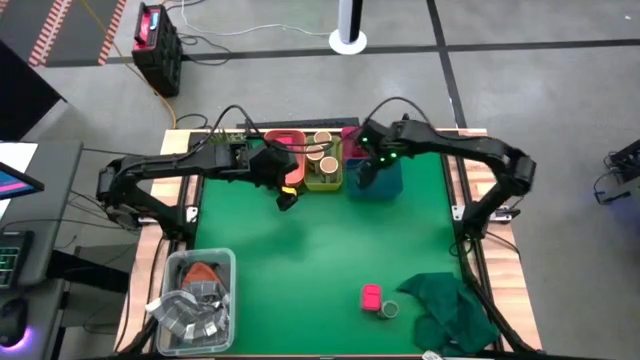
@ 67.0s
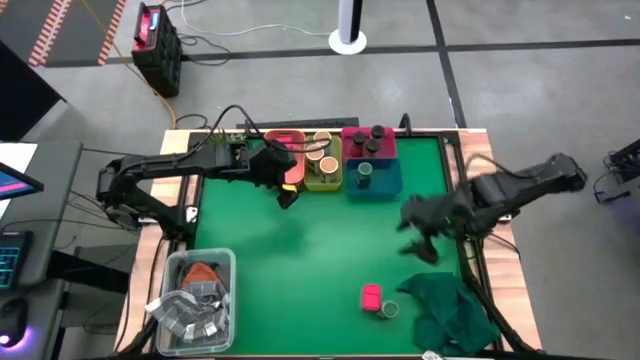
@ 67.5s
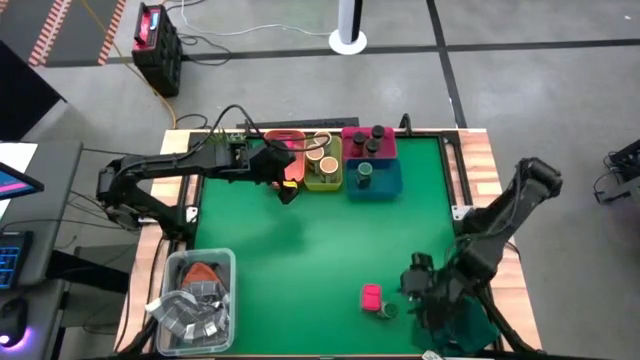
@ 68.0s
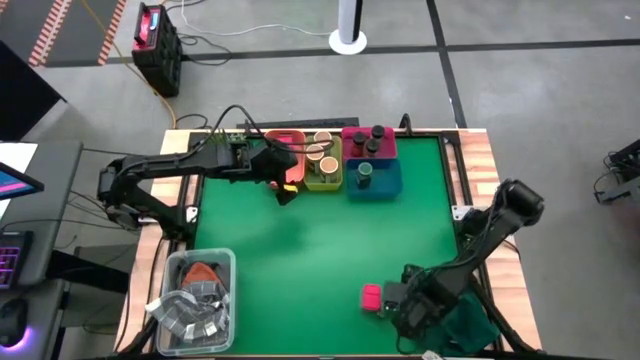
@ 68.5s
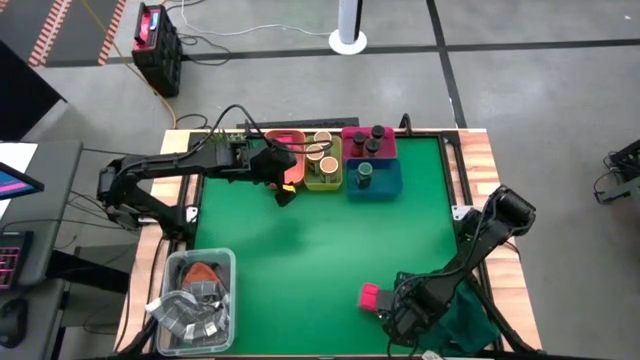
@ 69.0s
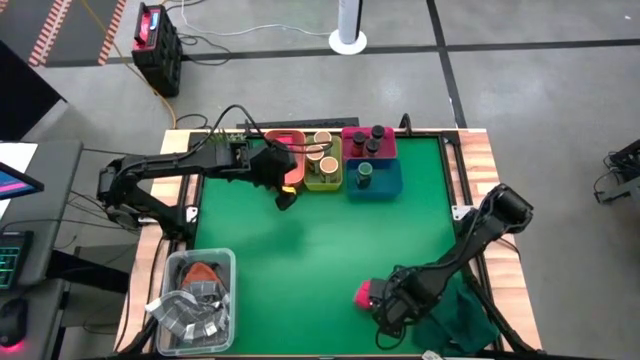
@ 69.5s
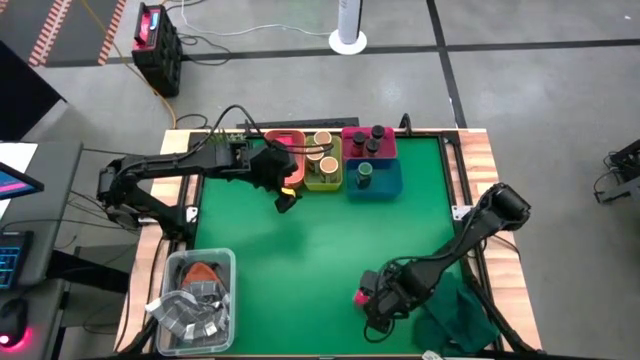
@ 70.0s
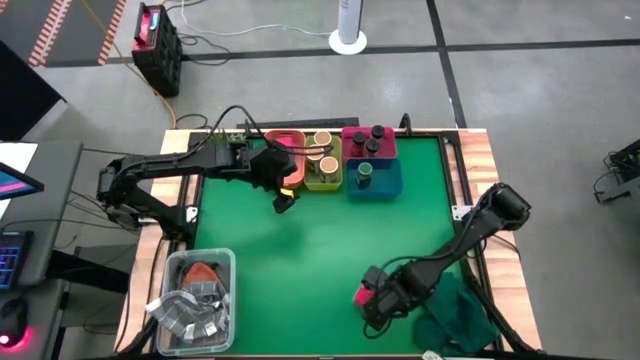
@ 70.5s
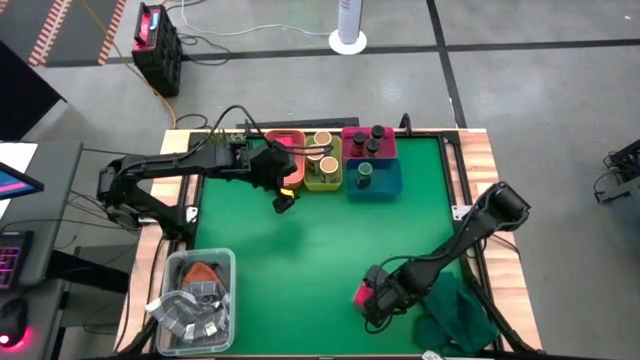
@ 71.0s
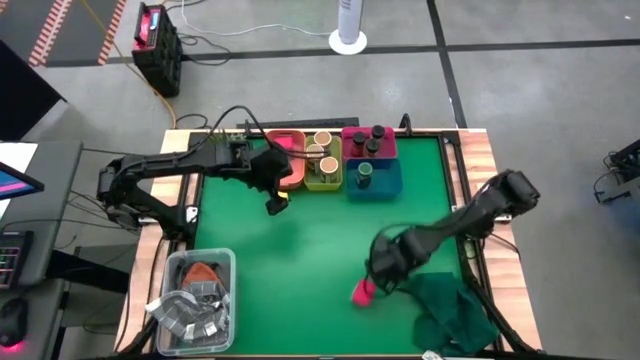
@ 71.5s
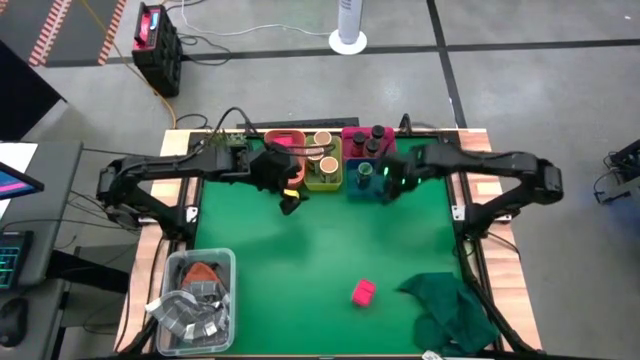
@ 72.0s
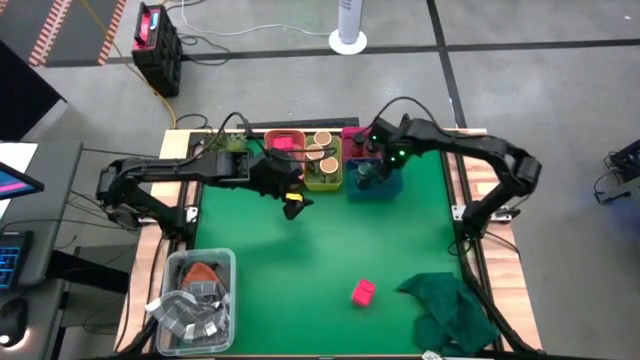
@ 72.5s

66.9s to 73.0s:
Task: Sort spices by type
Put the green seasoning bottle into the blue bin

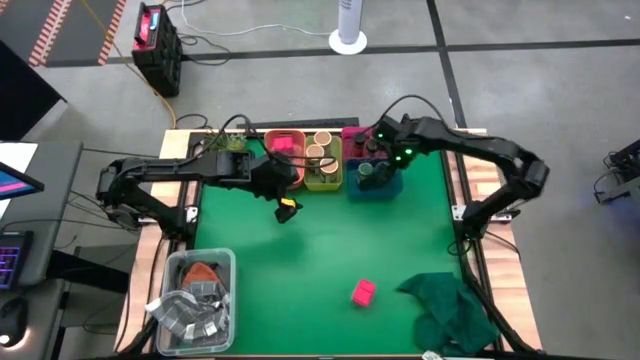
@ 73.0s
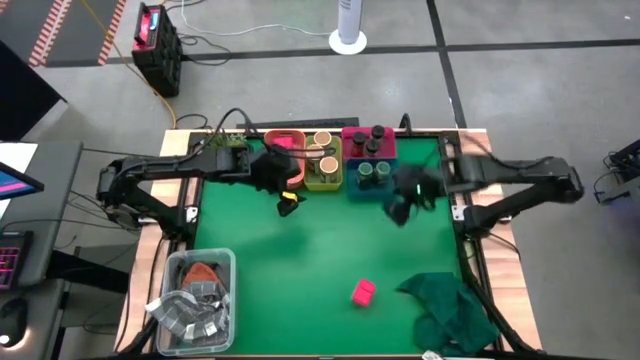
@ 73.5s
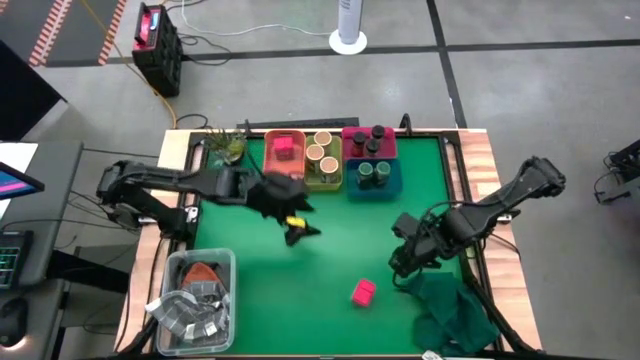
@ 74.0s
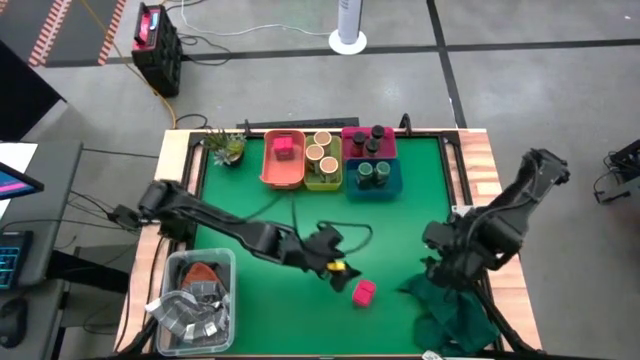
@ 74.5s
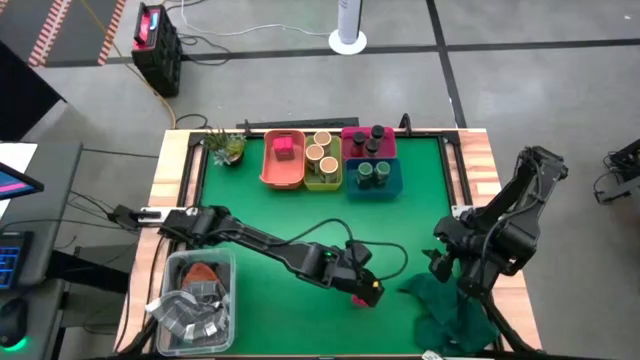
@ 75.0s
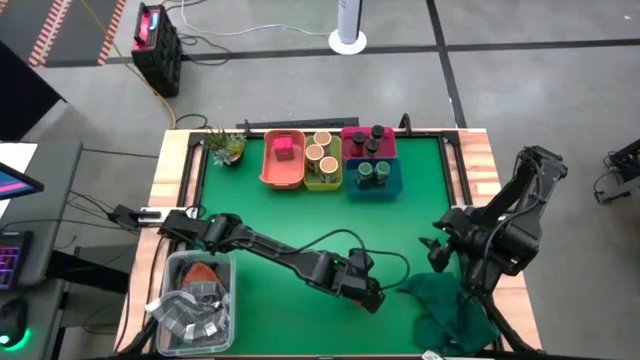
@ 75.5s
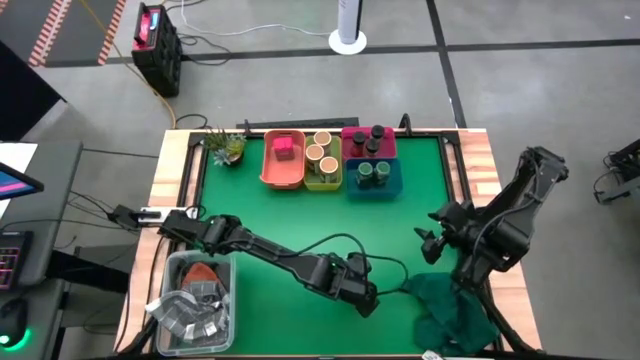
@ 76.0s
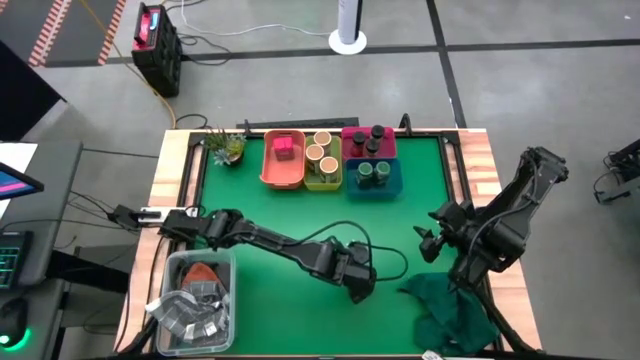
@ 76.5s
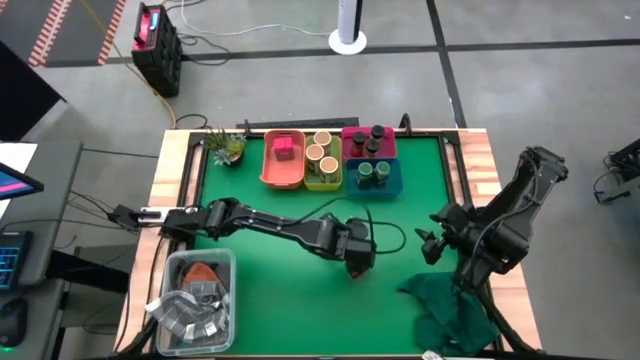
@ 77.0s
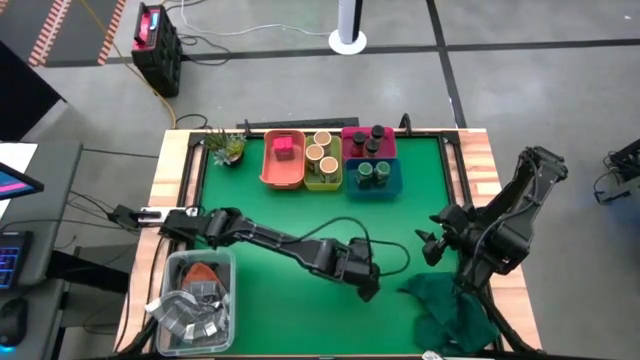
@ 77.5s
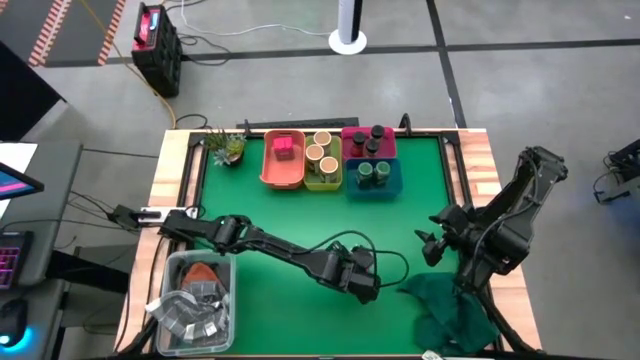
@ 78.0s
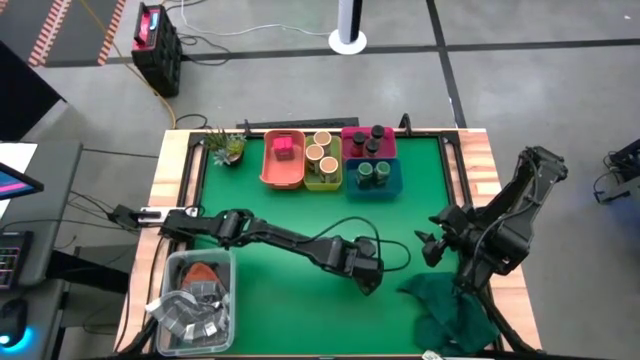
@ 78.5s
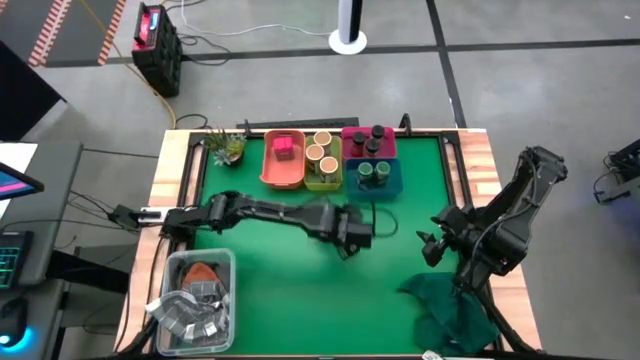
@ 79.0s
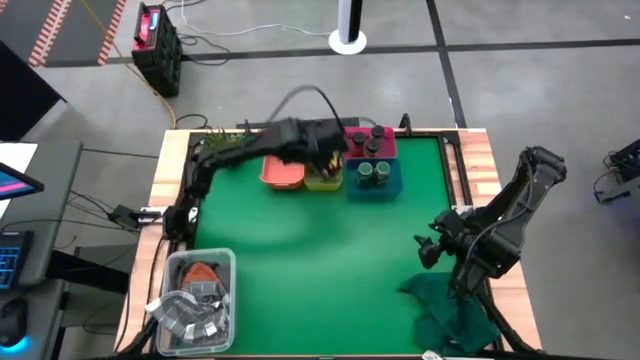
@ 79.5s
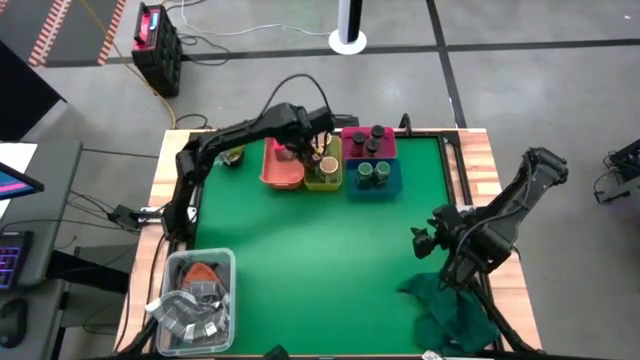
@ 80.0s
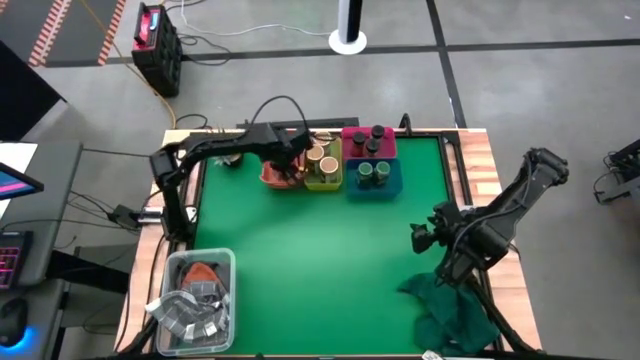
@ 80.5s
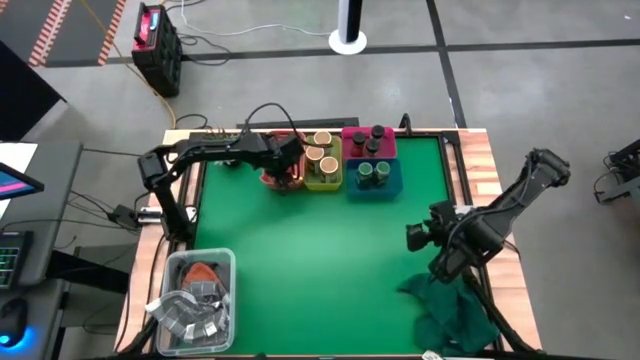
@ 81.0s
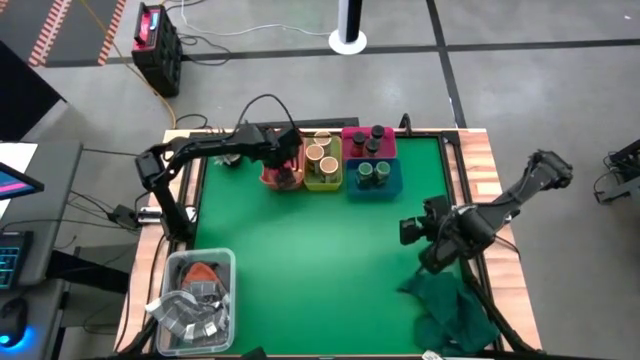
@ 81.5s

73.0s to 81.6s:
Put the red seasoning can into the orange bin

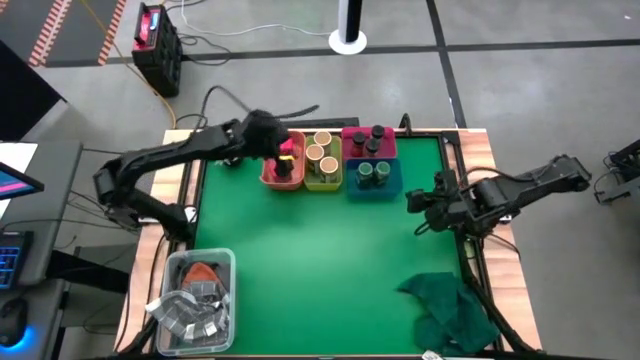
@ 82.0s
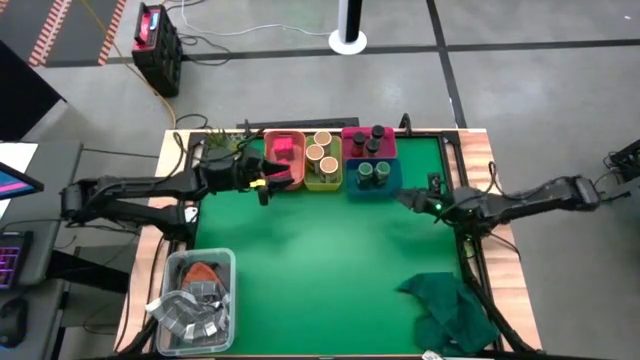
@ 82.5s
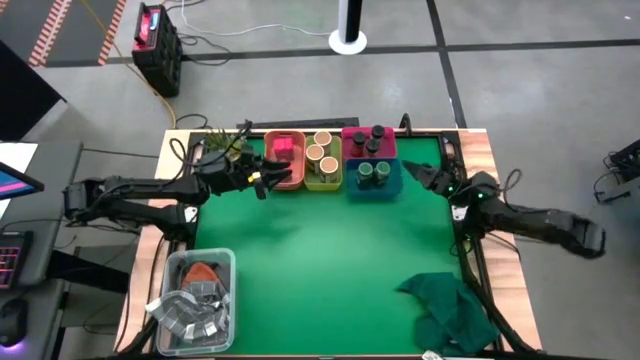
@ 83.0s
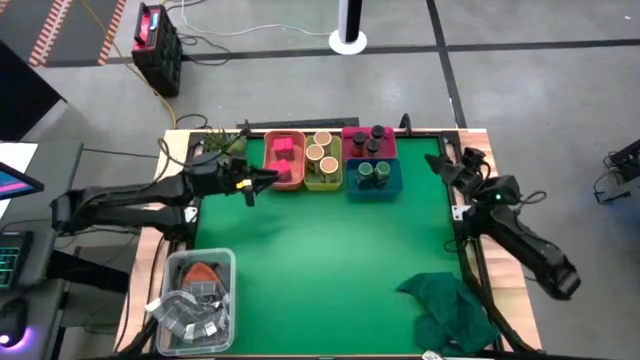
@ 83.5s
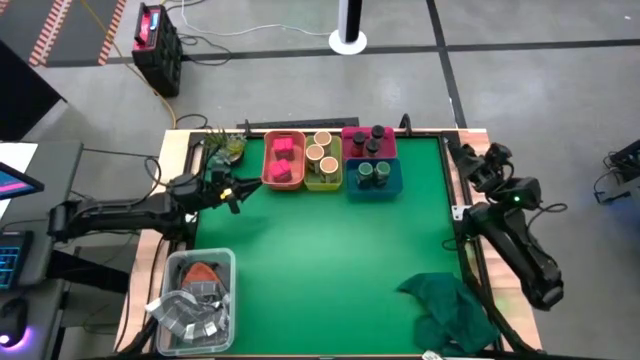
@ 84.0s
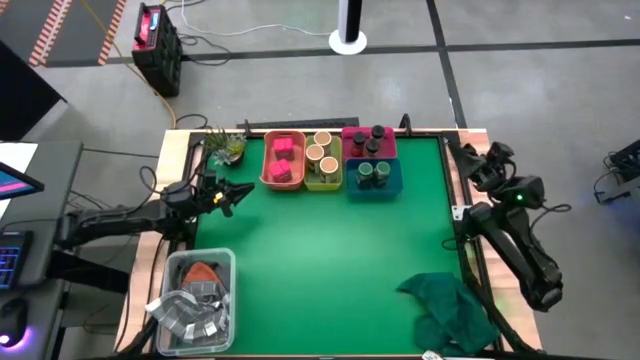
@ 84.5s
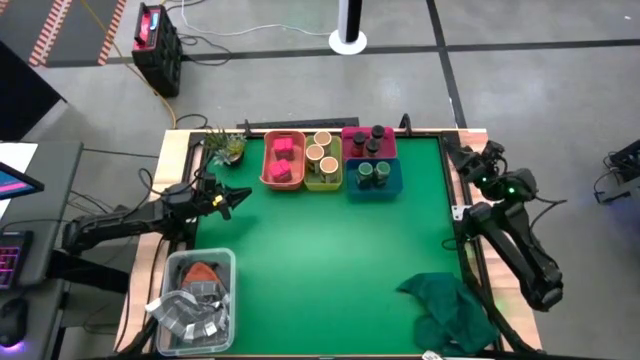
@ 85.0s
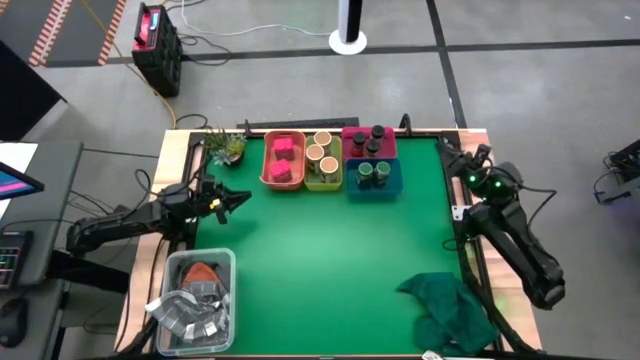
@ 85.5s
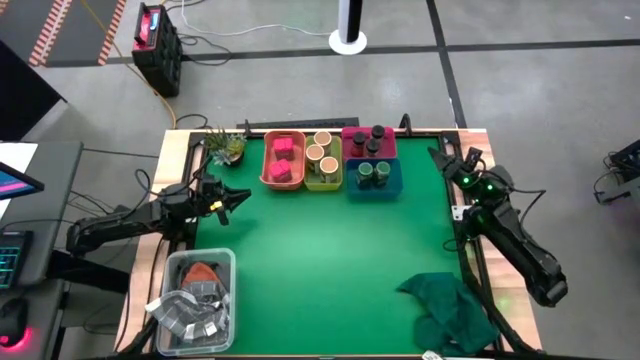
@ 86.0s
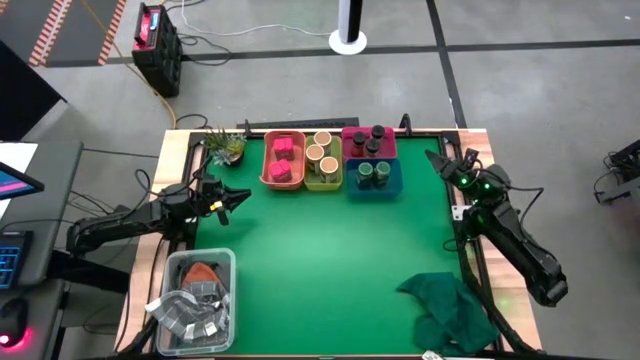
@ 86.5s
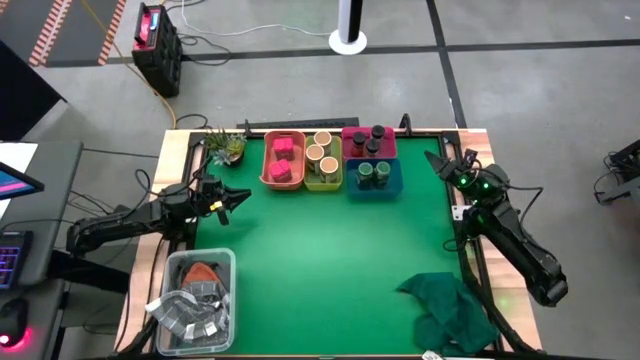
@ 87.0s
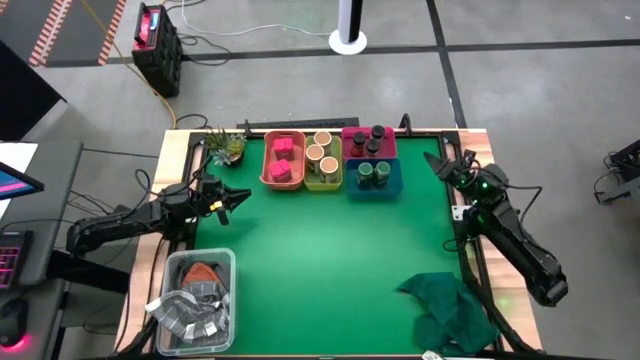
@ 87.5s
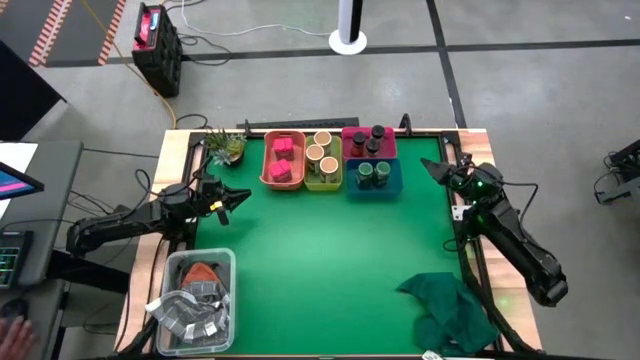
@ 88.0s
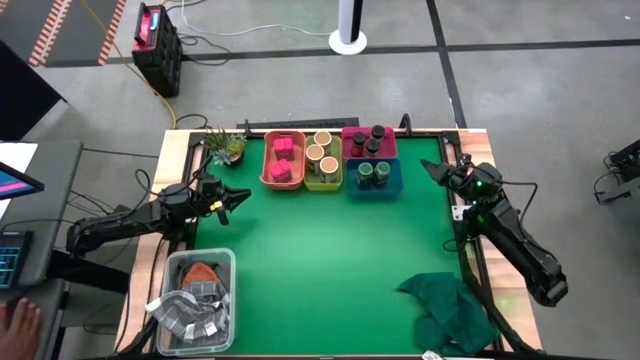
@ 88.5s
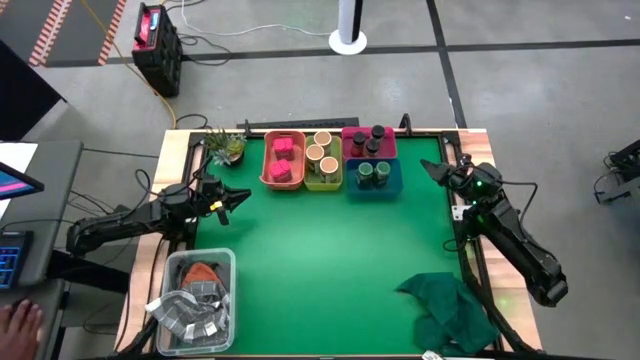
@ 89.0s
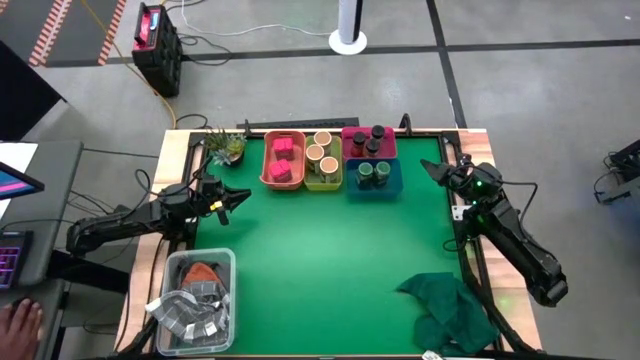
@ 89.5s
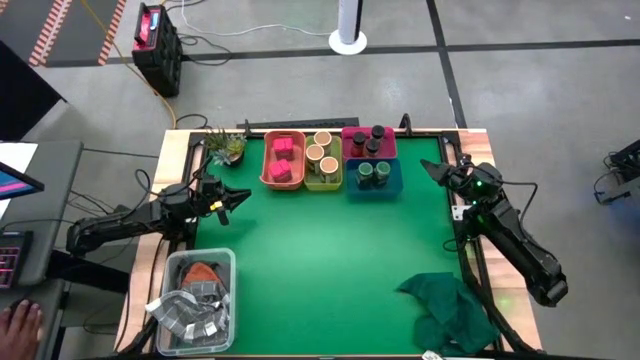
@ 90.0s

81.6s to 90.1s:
Return to Home Position
